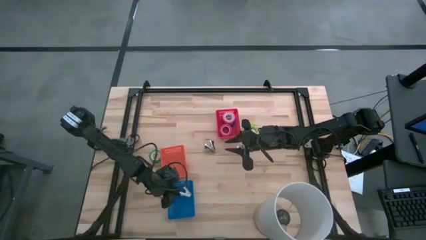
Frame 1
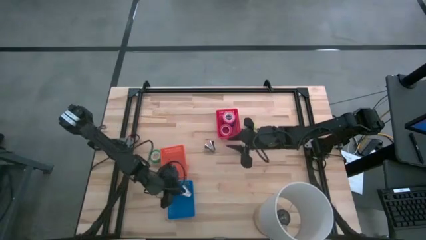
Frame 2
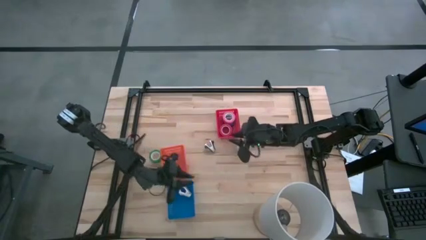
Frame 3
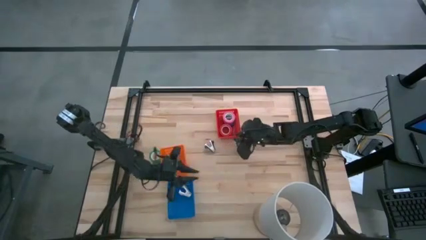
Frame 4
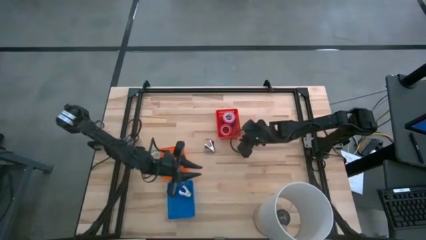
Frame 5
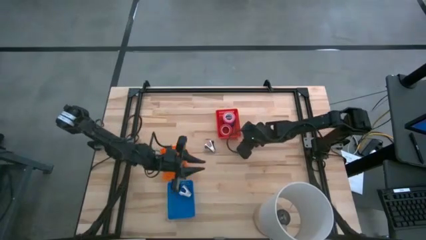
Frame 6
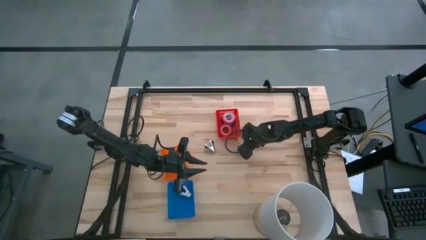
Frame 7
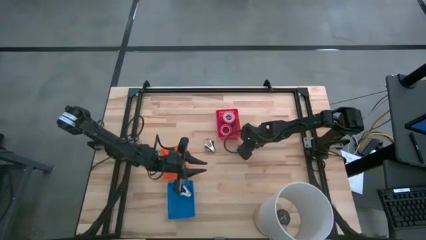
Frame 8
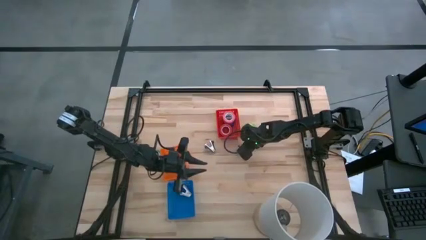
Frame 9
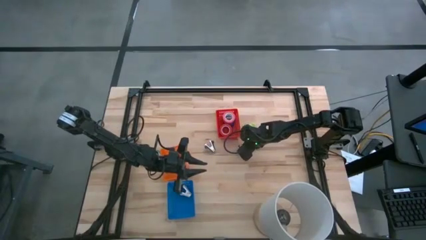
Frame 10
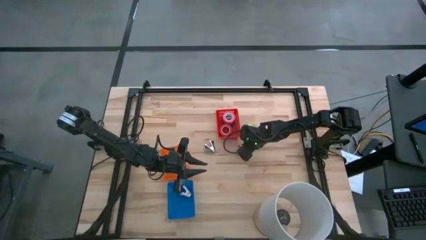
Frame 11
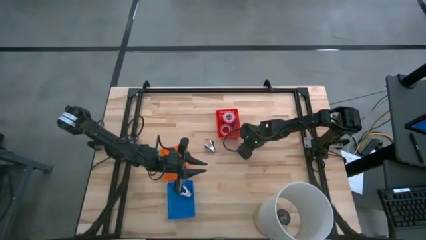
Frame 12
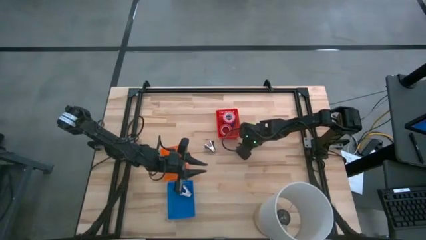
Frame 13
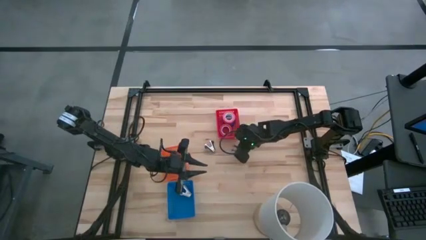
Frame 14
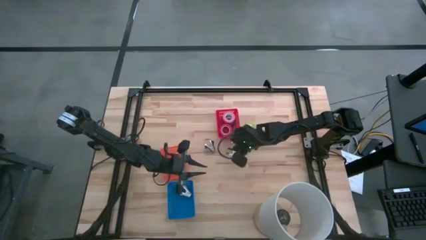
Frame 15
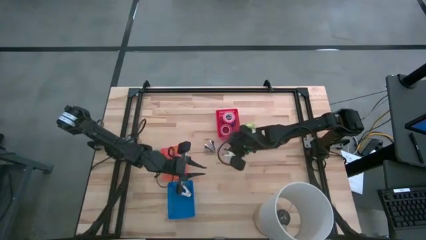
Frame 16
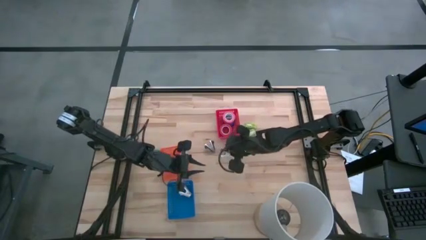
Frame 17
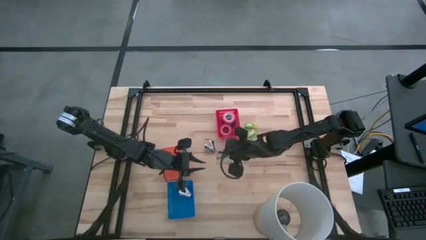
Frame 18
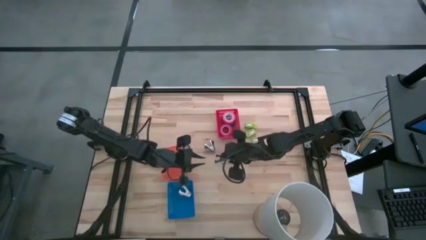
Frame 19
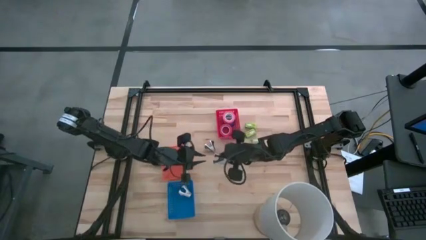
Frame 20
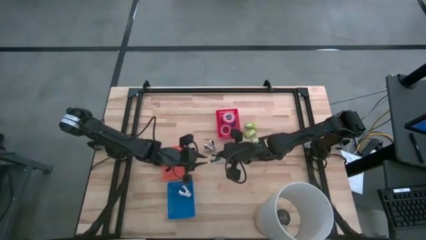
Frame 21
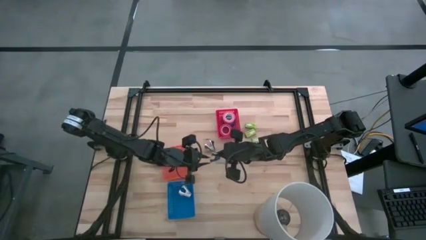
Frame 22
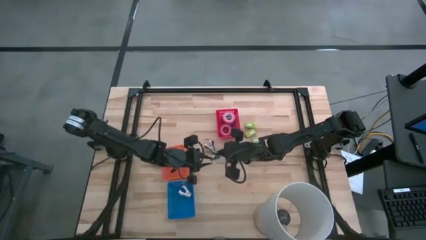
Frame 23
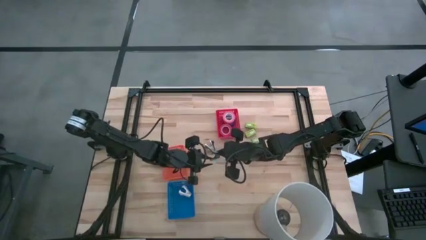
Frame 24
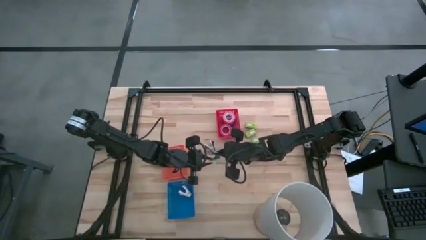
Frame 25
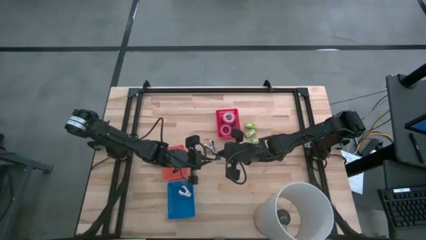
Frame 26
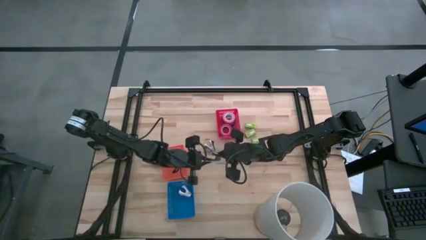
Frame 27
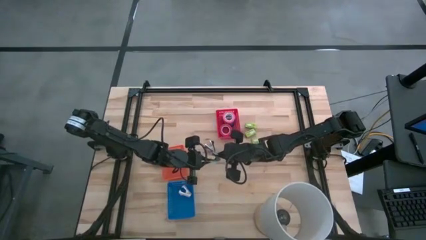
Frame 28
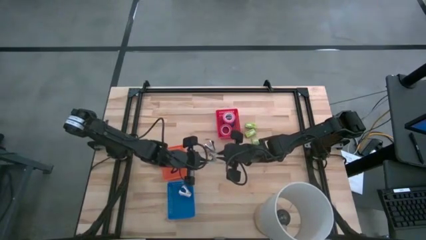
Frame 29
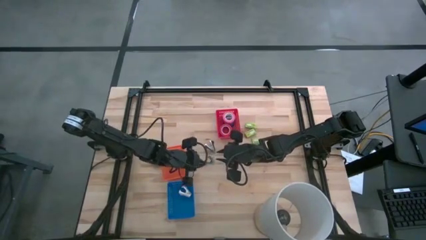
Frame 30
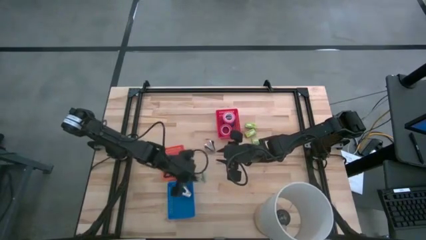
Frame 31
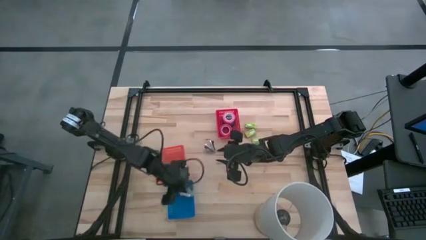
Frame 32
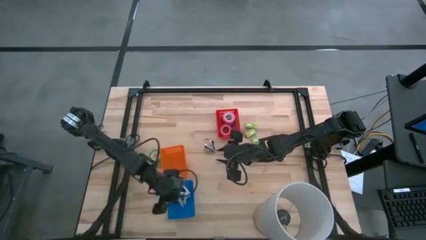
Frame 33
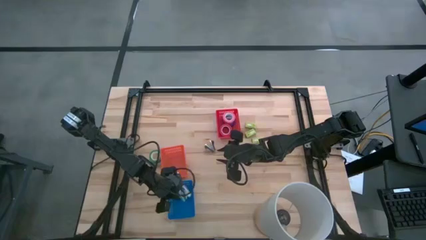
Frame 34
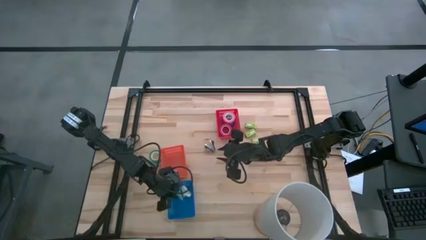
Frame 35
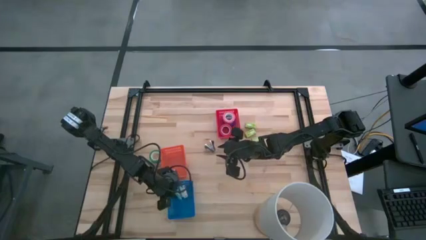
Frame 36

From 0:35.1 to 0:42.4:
Task: Pick and place Stapler, Stapler remover, tape
Put the light blue staple remover into the blue bin

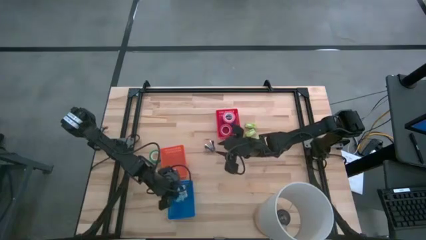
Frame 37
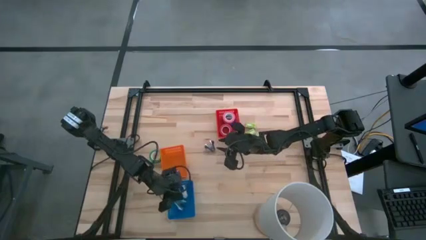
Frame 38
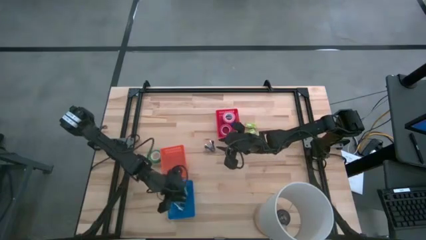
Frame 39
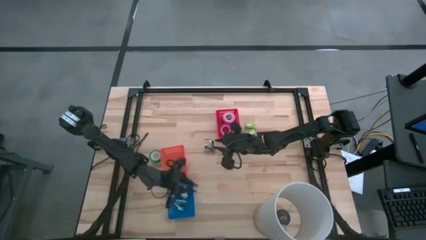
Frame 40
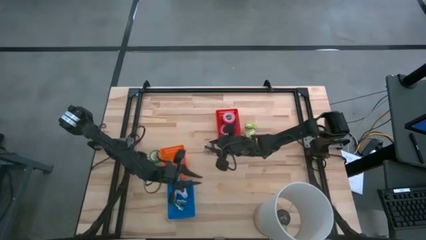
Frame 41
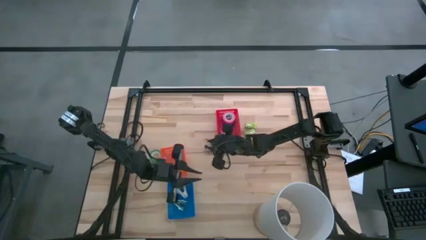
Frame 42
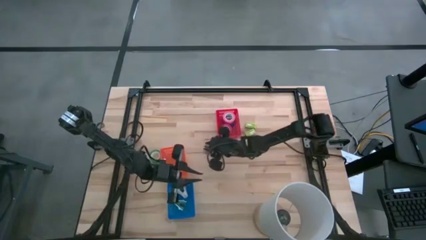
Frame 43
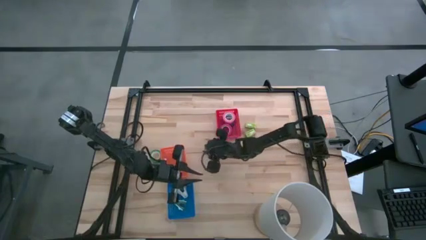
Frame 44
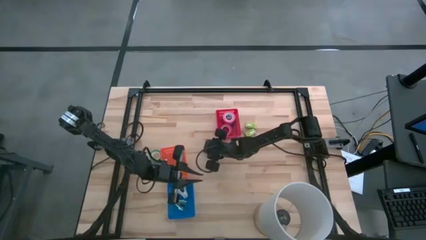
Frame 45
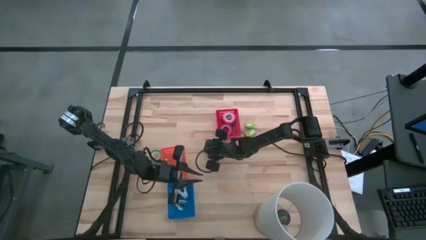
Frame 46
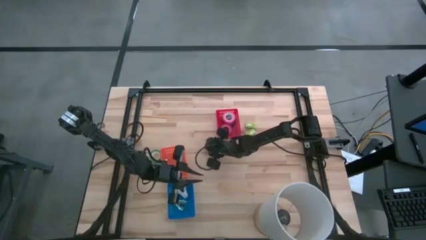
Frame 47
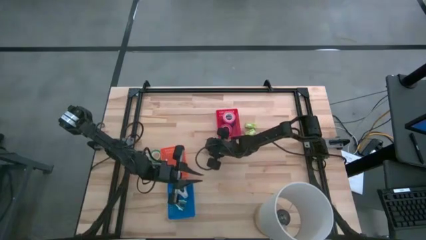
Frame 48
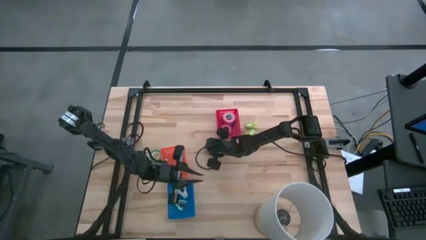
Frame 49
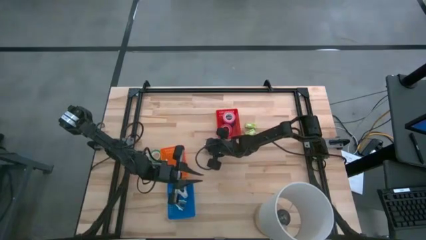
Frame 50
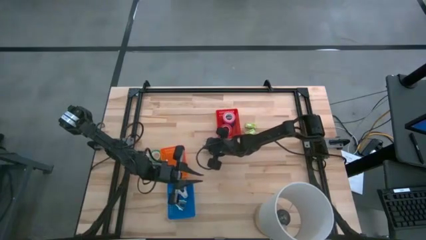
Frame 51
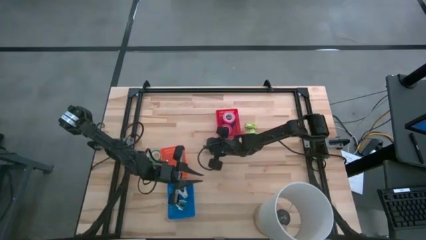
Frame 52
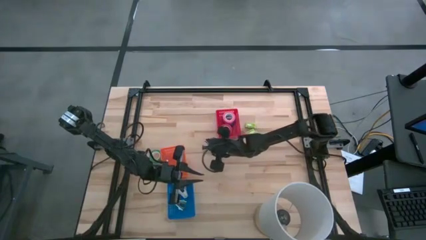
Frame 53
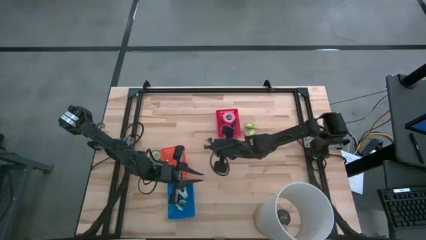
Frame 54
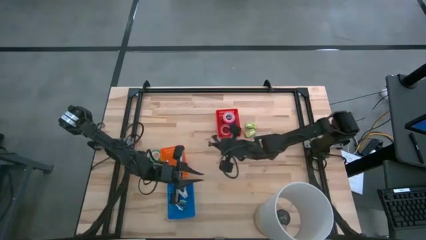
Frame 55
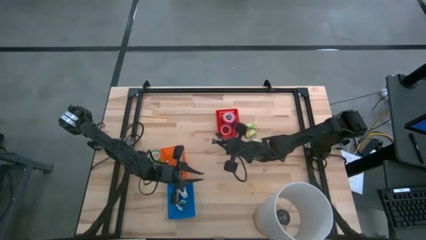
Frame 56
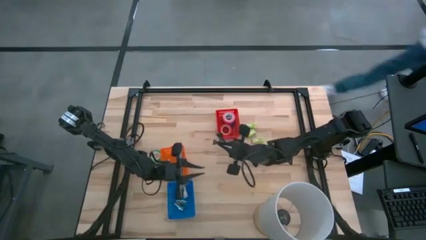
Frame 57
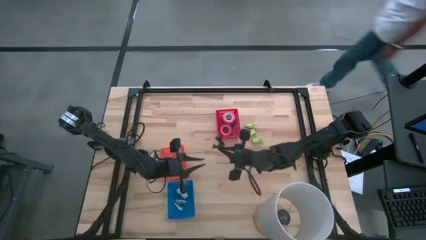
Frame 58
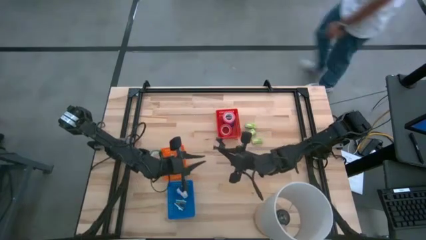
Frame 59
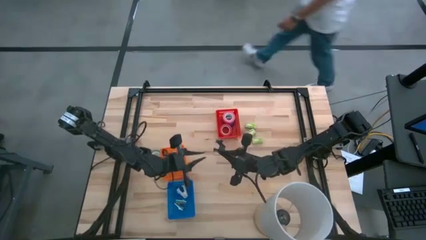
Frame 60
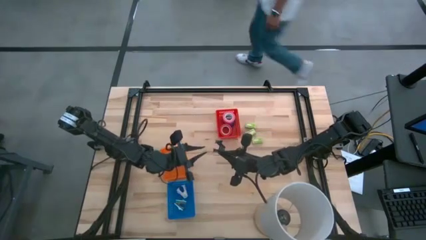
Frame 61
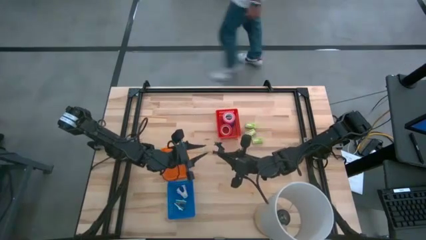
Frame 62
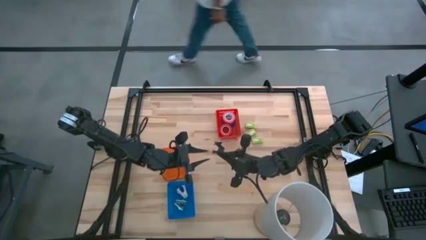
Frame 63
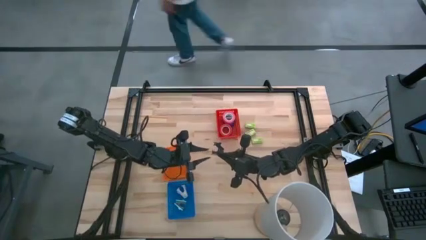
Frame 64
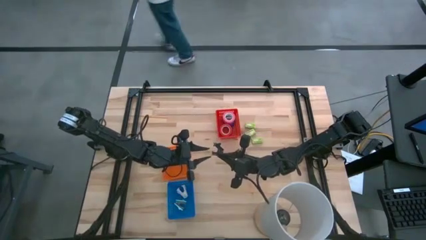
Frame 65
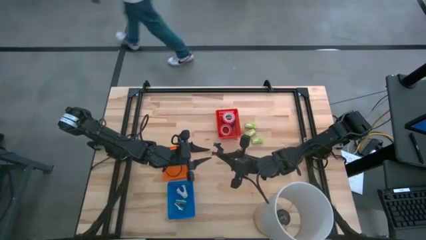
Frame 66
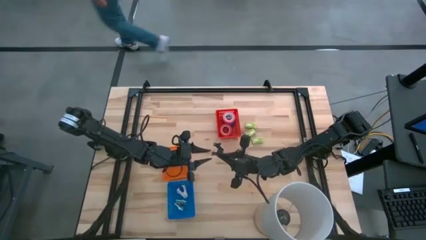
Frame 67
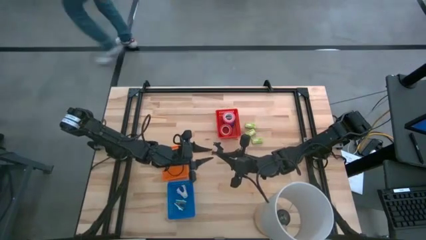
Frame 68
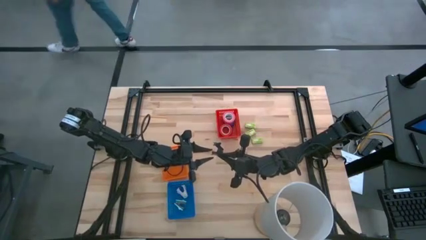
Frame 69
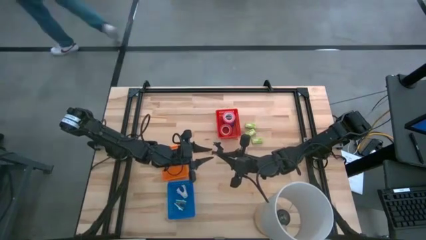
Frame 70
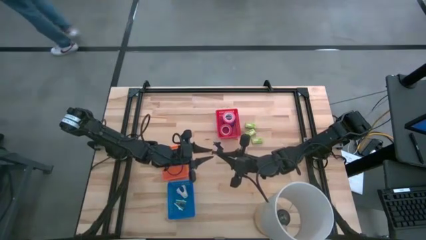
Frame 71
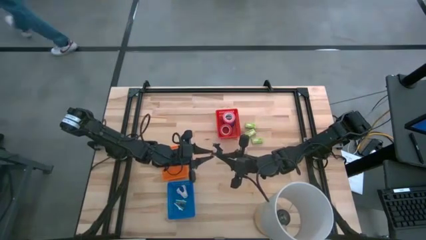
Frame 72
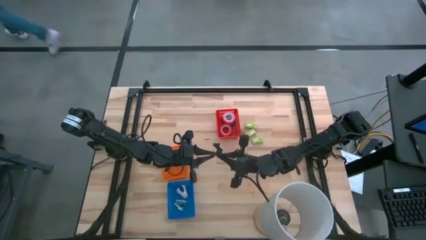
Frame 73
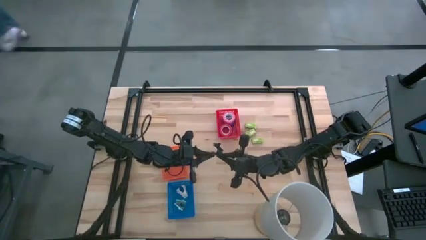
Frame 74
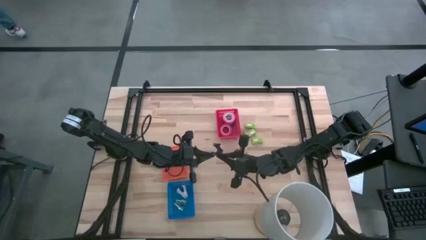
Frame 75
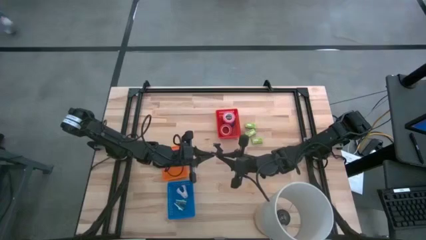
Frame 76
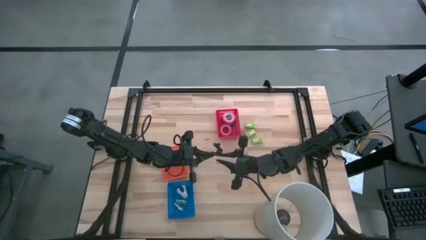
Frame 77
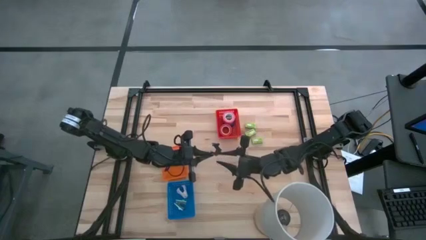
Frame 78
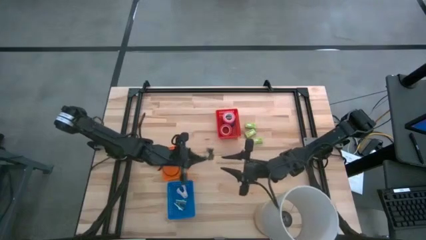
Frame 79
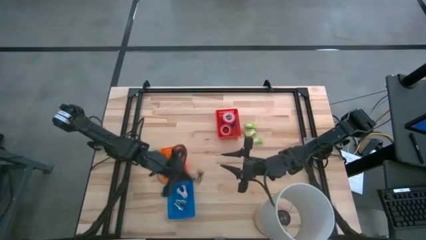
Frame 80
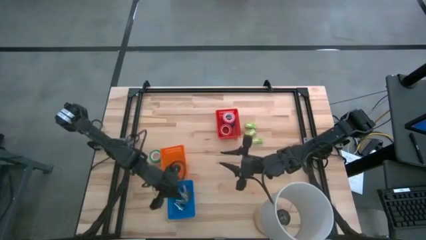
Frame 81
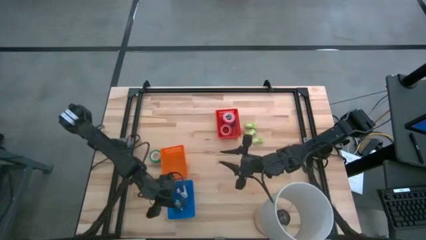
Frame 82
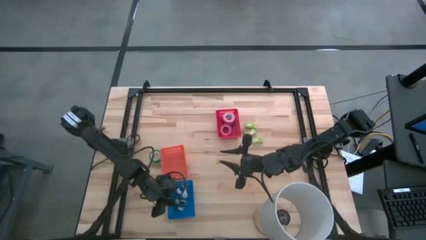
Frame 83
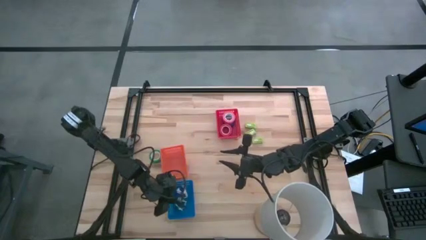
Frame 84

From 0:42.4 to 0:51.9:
Put the black staple remover into the blue bin
